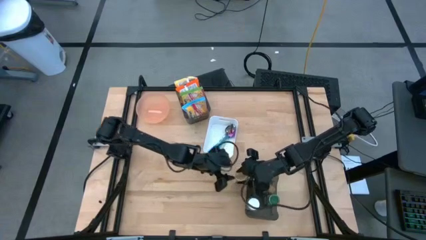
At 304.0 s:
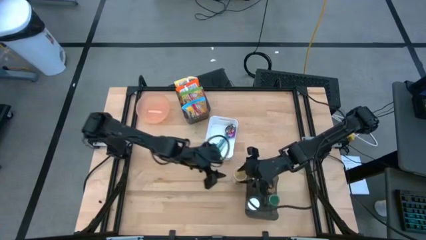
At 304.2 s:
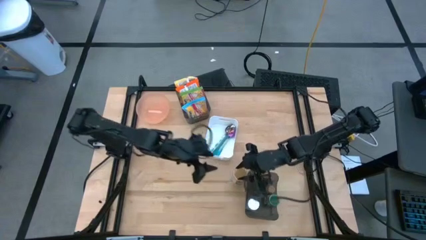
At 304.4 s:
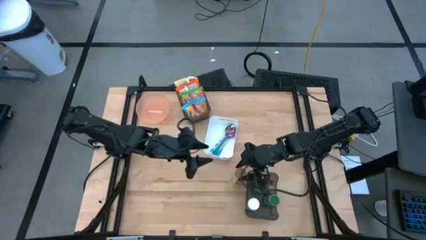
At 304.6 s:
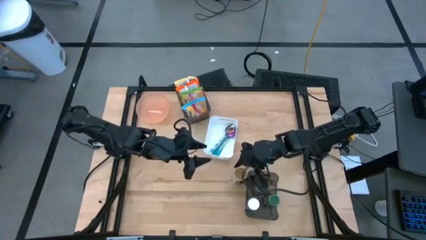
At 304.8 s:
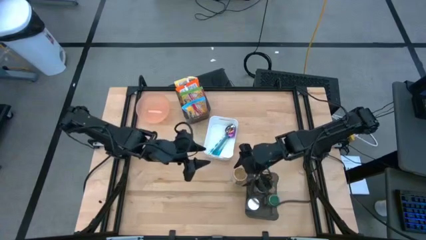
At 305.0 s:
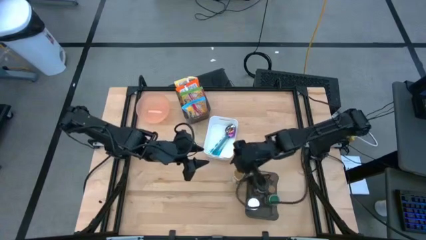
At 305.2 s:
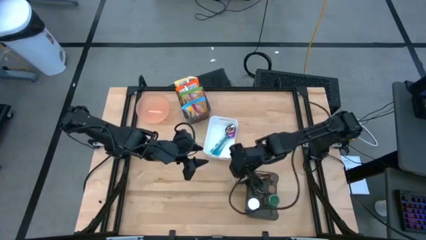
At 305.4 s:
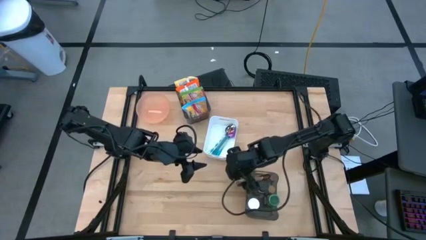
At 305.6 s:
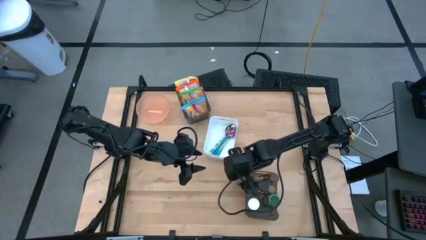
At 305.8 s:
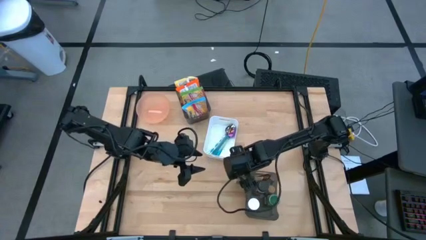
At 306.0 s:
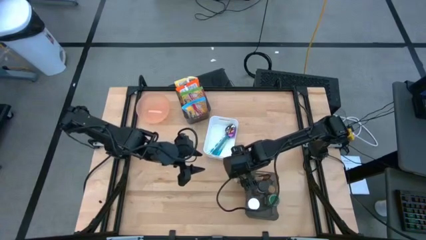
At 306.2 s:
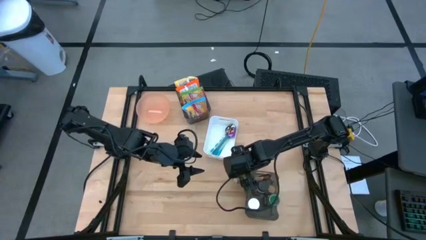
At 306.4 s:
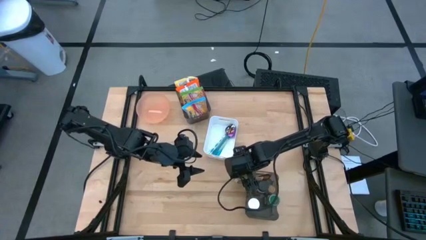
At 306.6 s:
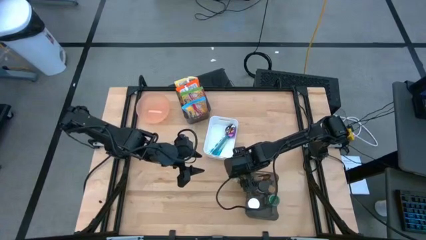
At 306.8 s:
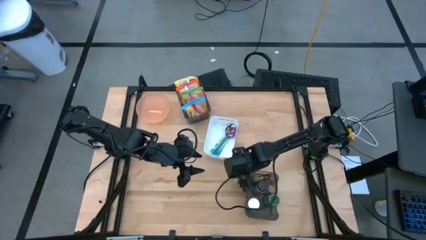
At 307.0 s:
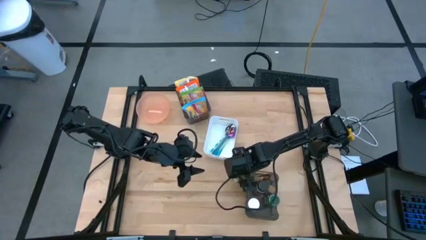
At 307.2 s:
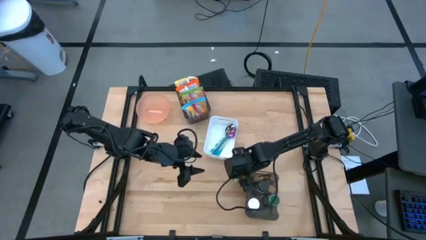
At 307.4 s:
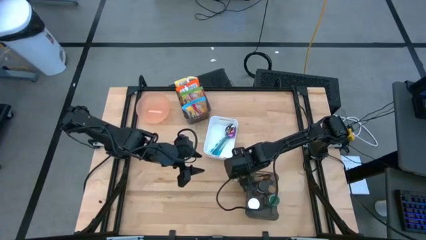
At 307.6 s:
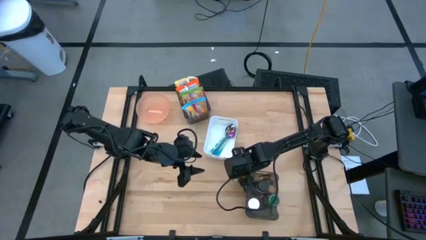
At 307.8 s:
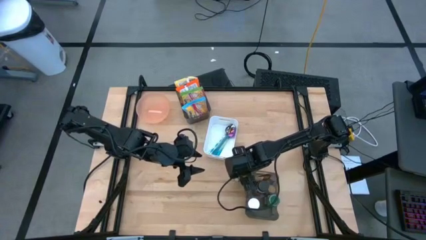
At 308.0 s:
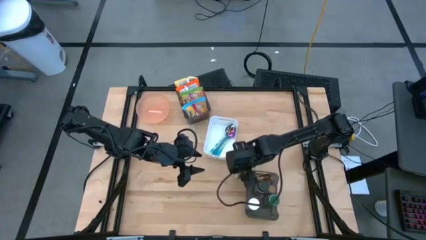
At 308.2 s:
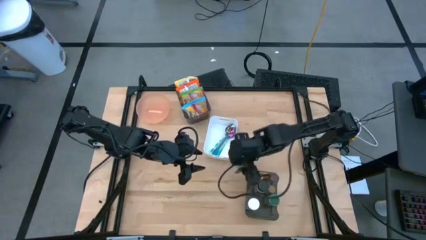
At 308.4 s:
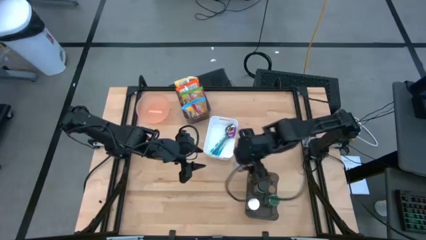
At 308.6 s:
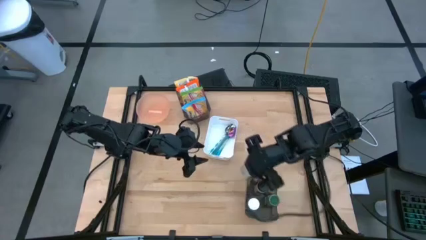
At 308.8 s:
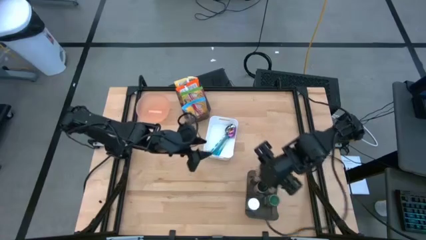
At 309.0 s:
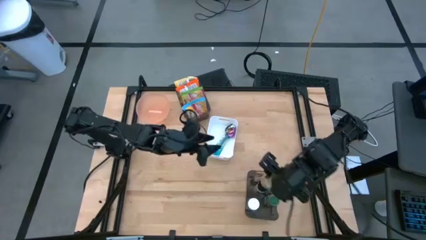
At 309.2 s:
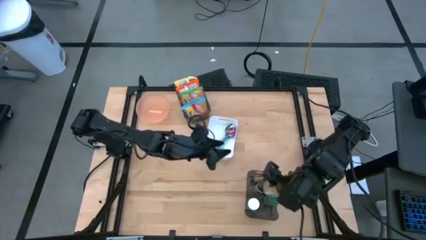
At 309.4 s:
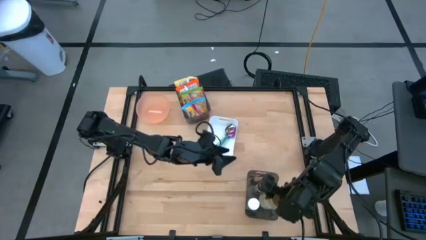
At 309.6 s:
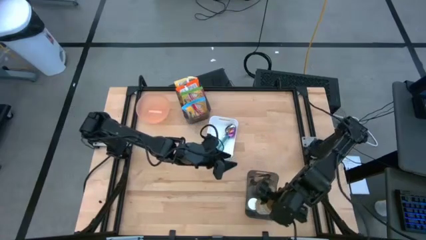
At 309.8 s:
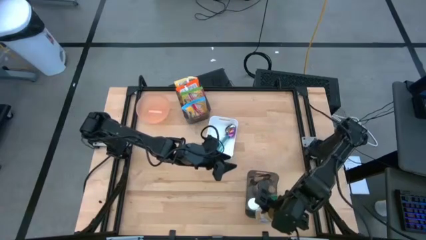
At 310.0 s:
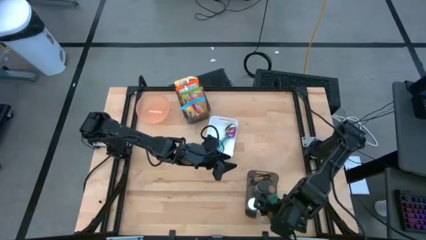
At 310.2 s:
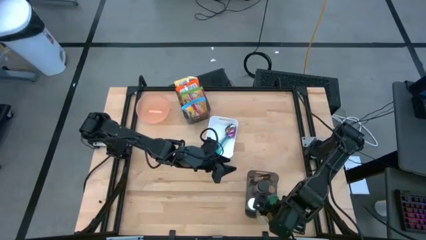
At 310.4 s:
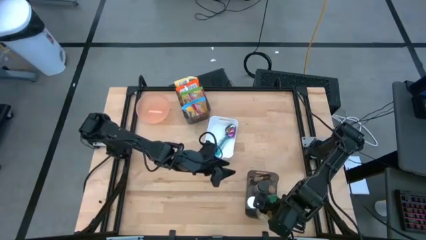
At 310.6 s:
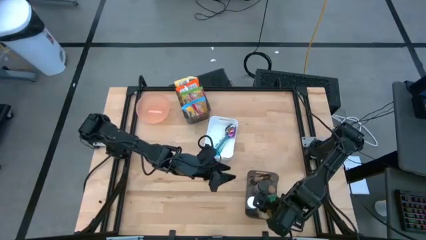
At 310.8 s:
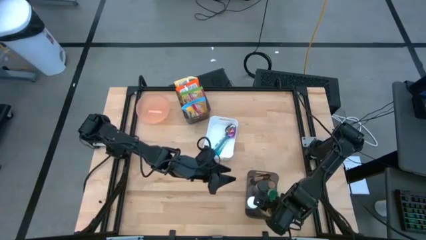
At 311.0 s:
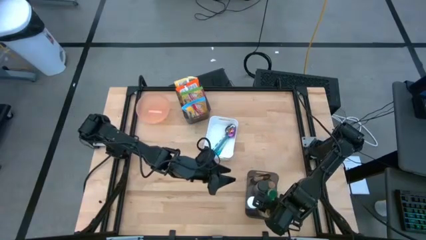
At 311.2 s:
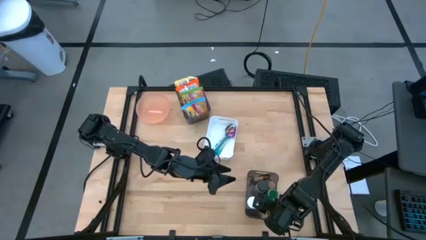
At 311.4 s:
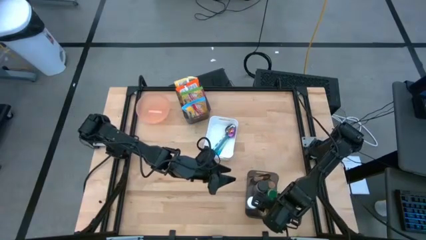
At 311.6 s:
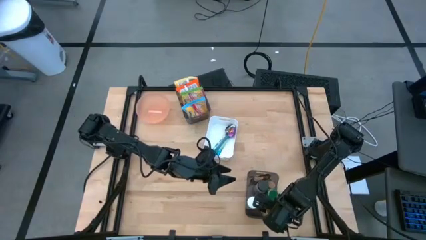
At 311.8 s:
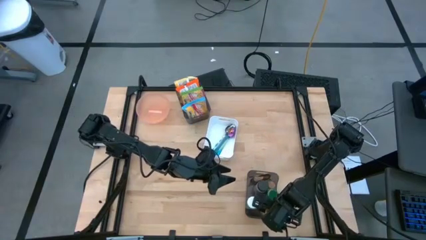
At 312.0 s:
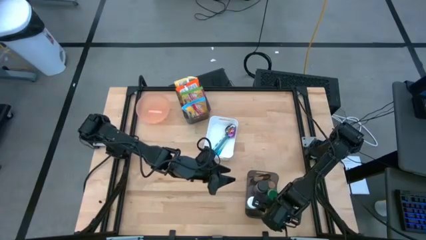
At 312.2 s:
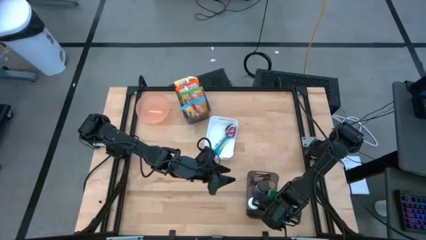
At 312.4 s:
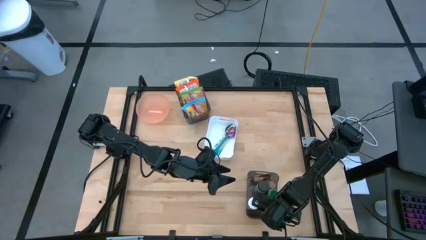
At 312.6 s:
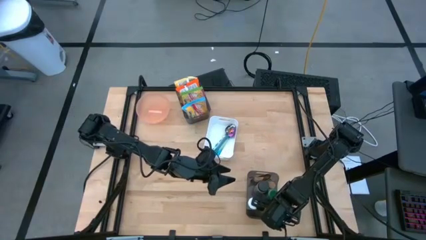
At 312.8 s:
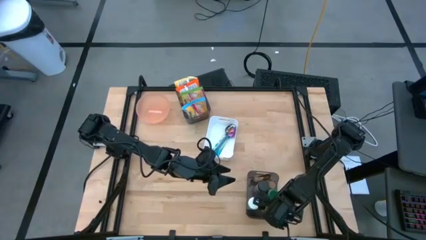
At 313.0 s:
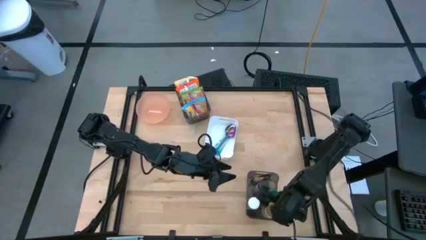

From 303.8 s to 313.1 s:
Task: Pick & Place Food Item
Put the gold seasoning bottle into the bottom black bin

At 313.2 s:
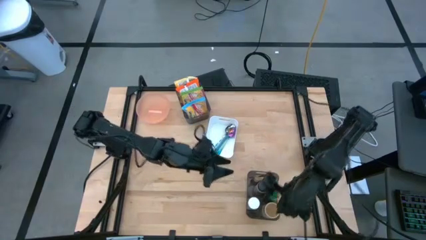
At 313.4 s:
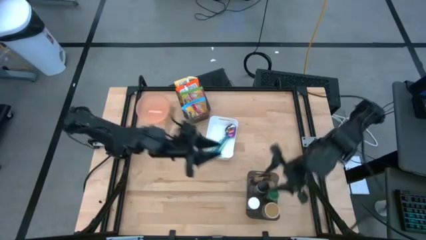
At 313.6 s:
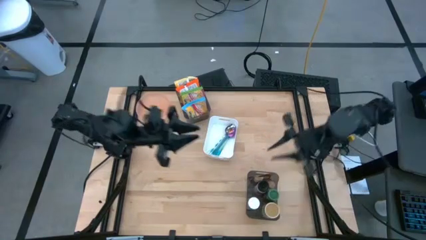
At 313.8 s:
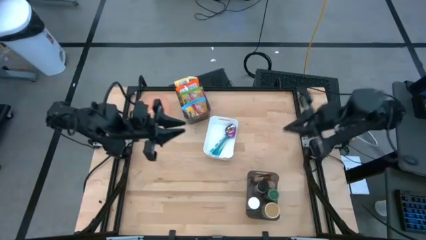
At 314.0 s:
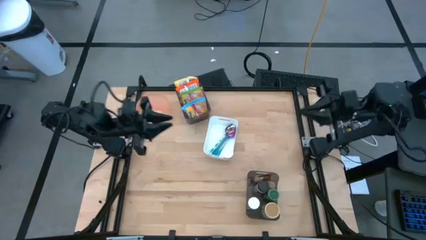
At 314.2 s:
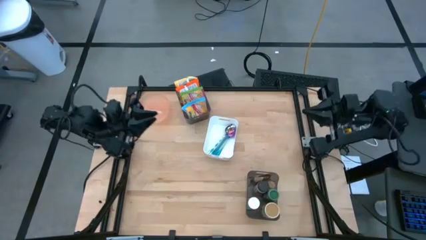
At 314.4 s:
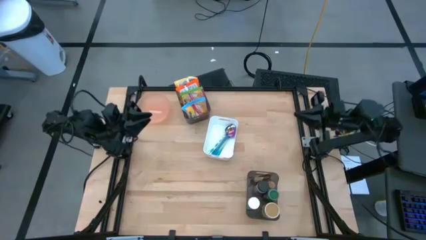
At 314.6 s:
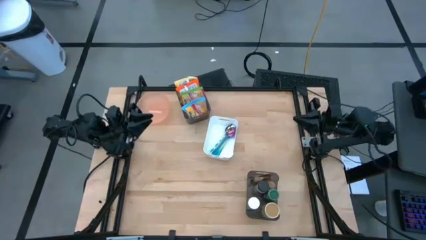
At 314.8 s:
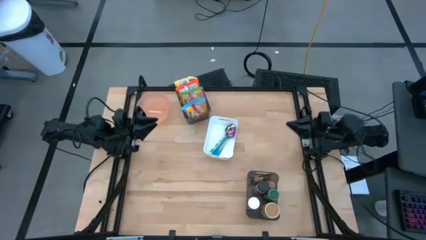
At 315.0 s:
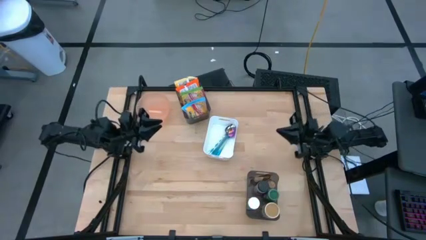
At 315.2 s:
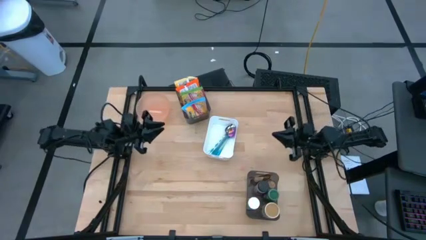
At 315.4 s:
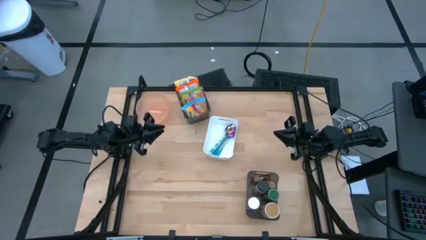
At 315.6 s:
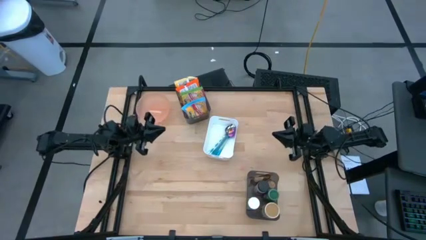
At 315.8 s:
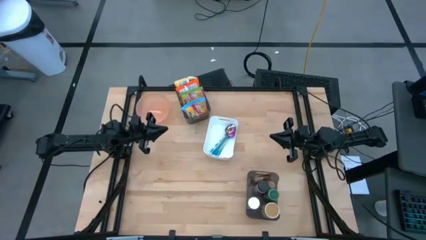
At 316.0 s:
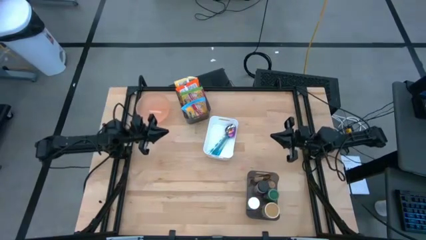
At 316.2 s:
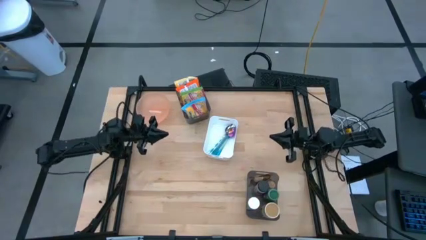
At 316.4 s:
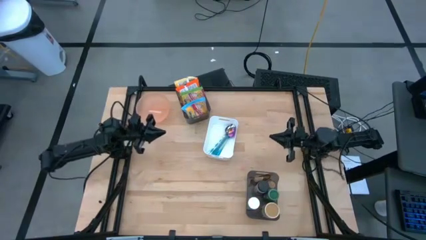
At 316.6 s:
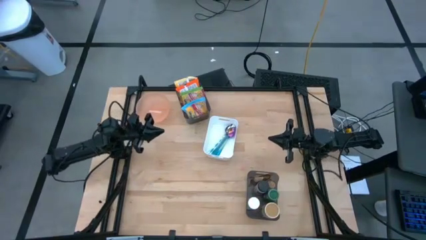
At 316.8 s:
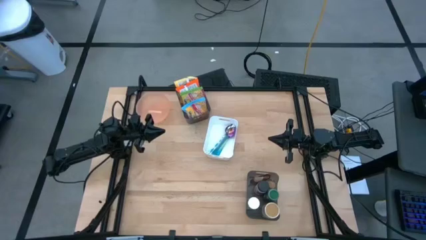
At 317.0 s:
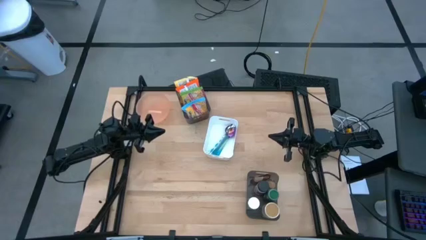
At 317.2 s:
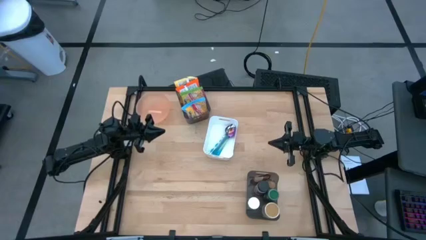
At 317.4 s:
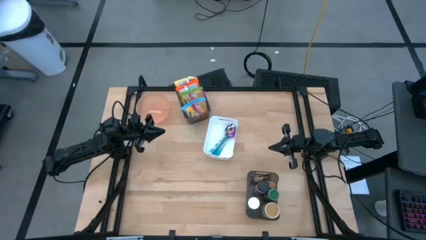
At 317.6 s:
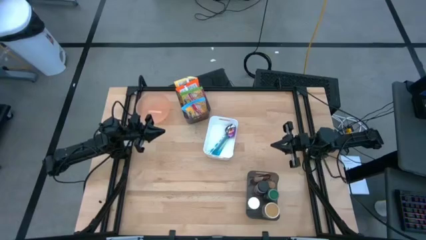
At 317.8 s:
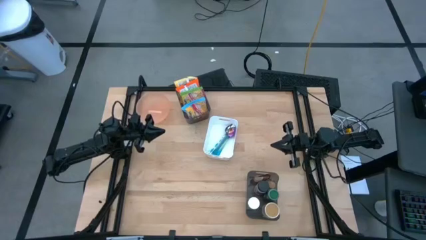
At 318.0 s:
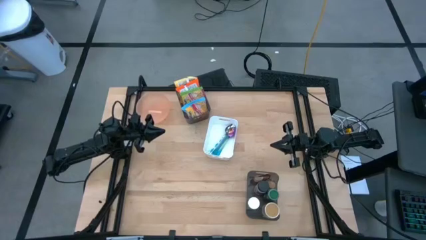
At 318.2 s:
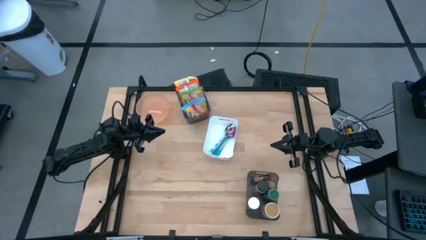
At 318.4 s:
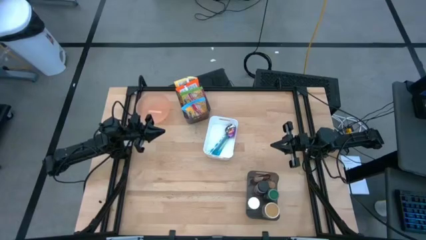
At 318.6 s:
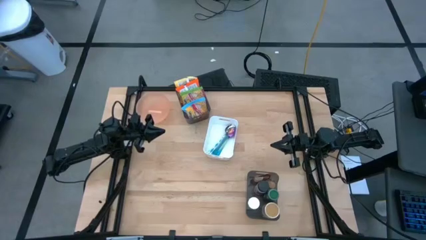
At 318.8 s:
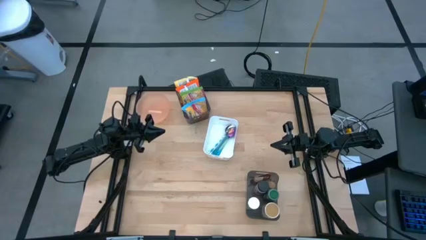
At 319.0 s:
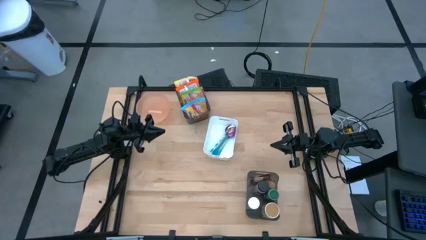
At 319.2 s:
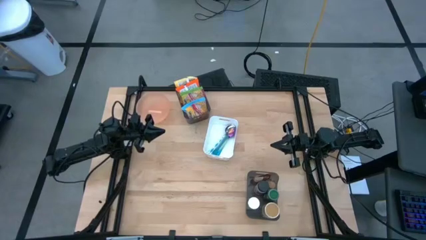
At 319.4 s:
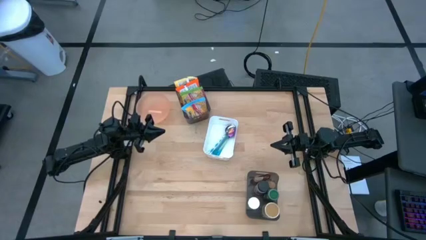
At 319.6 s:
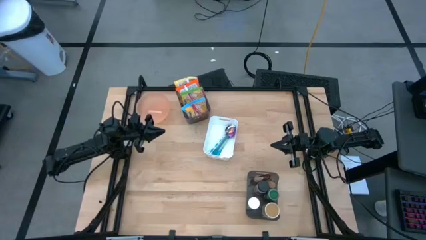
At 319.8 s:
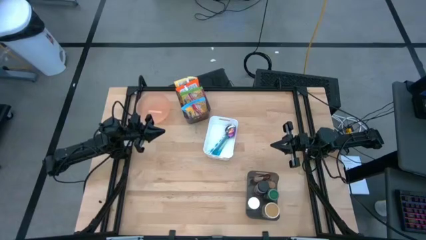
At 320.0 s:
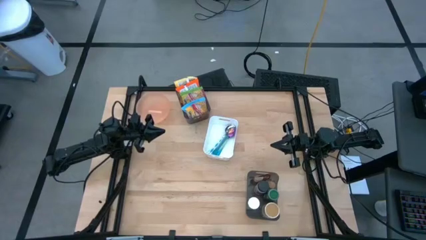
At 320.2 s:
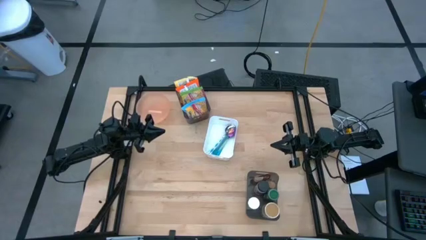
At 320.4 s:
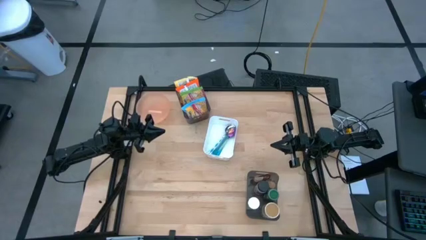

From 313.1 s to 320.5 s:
Return to Home Position
